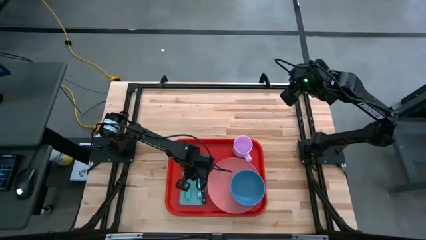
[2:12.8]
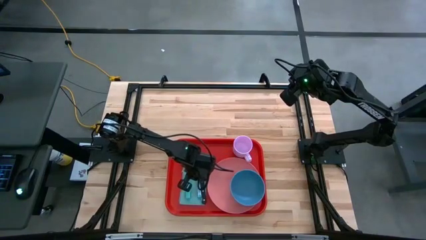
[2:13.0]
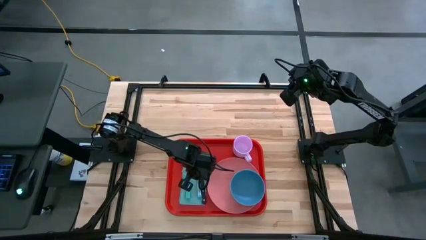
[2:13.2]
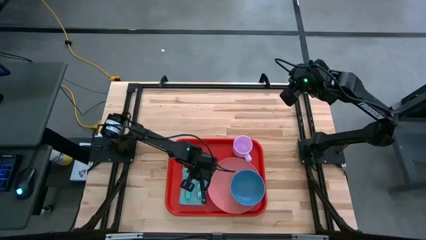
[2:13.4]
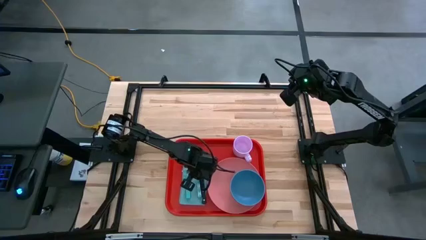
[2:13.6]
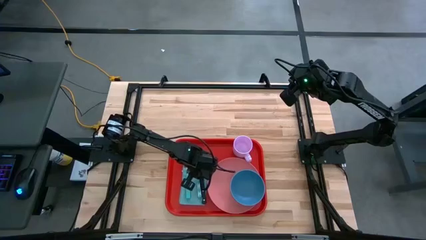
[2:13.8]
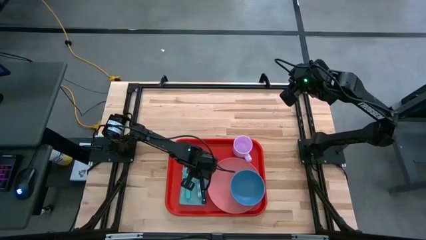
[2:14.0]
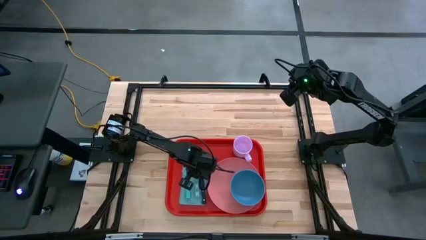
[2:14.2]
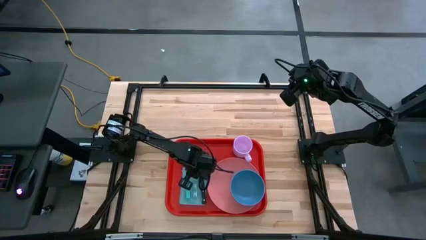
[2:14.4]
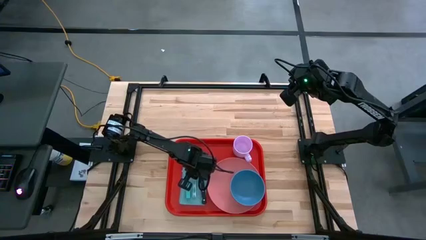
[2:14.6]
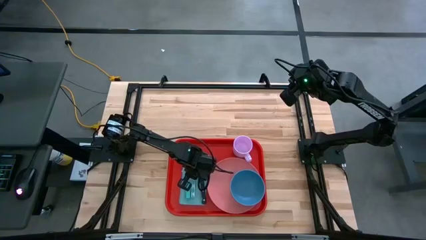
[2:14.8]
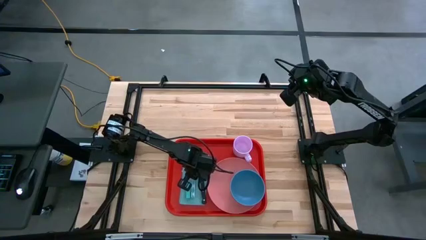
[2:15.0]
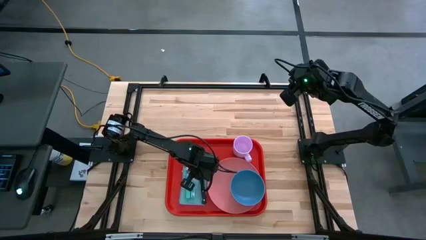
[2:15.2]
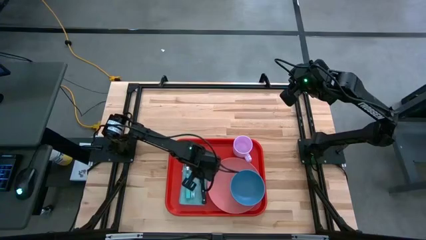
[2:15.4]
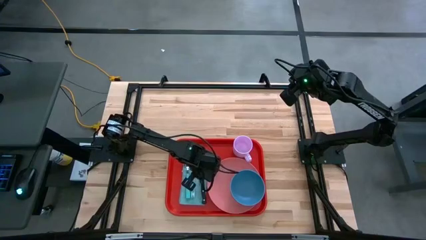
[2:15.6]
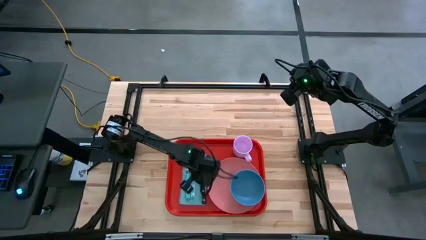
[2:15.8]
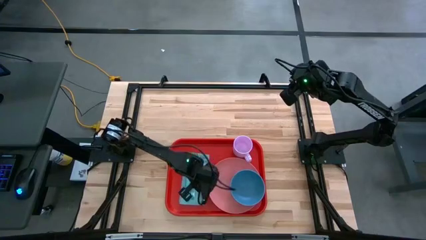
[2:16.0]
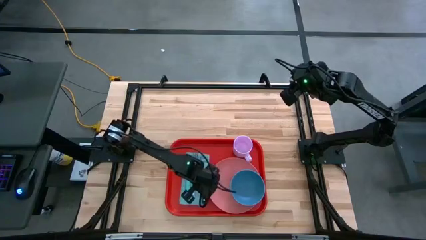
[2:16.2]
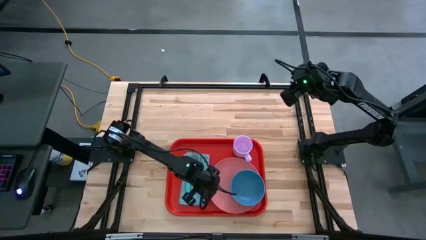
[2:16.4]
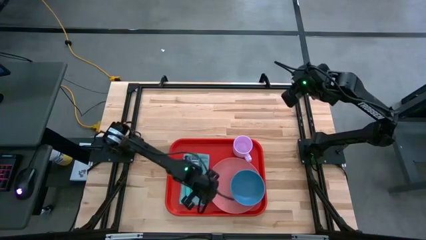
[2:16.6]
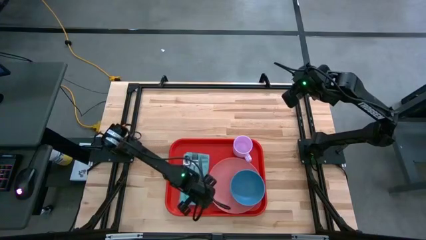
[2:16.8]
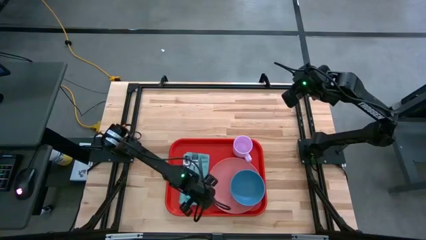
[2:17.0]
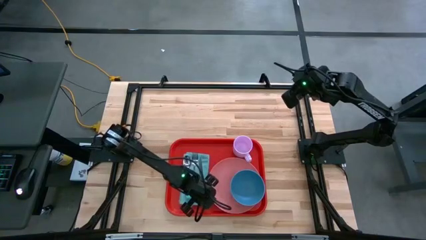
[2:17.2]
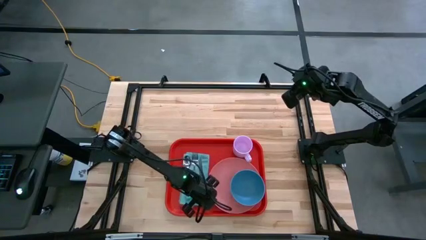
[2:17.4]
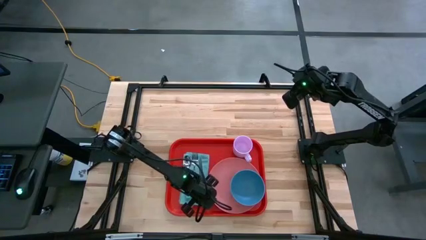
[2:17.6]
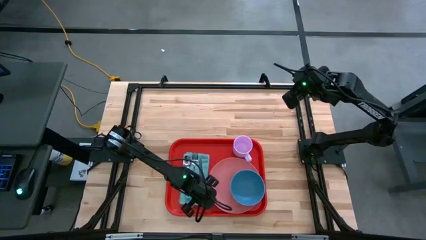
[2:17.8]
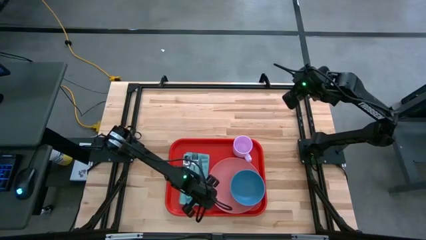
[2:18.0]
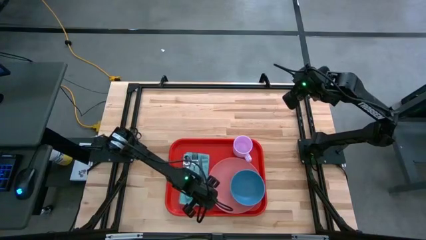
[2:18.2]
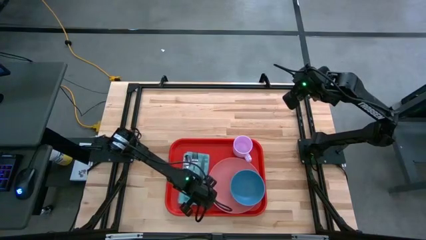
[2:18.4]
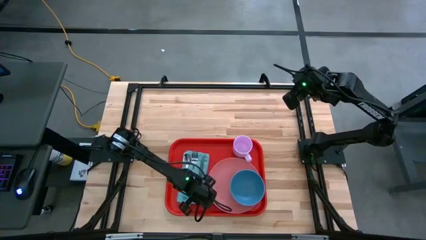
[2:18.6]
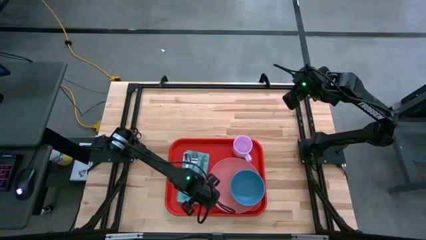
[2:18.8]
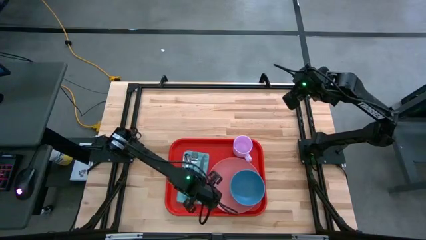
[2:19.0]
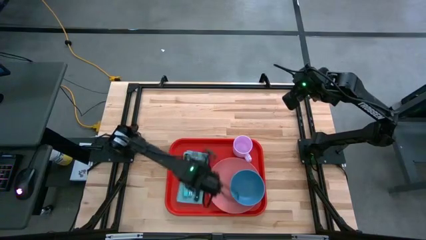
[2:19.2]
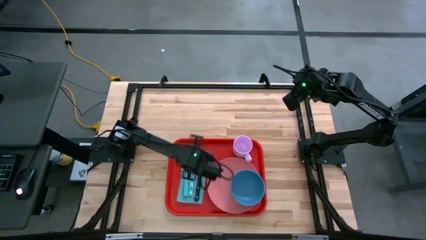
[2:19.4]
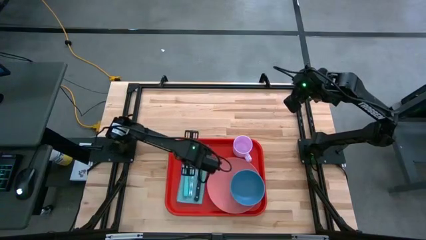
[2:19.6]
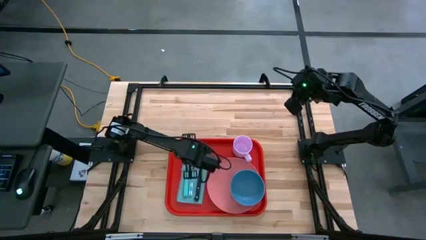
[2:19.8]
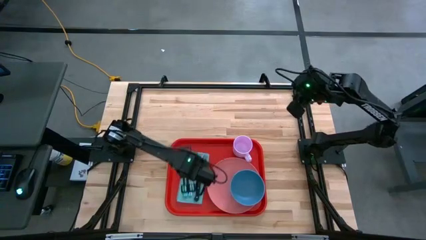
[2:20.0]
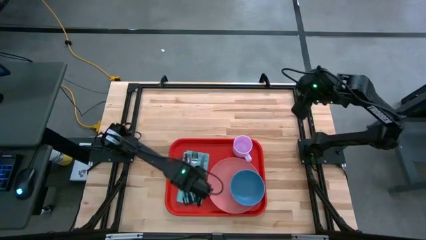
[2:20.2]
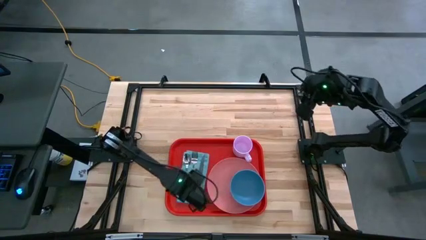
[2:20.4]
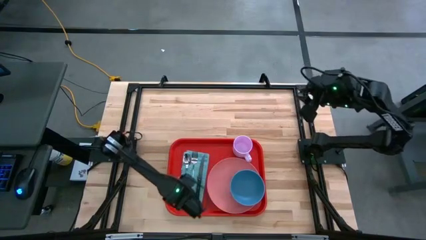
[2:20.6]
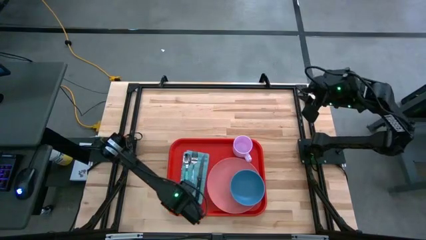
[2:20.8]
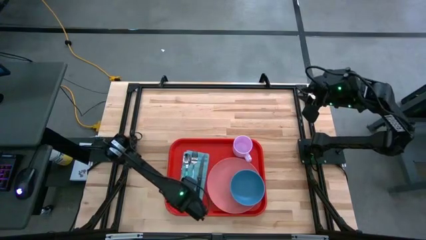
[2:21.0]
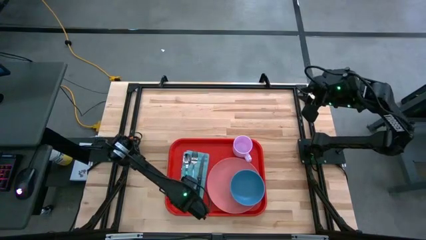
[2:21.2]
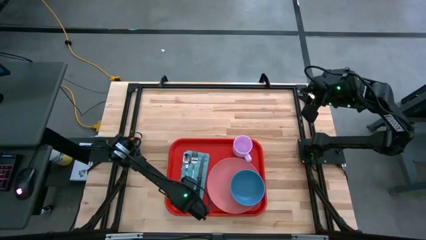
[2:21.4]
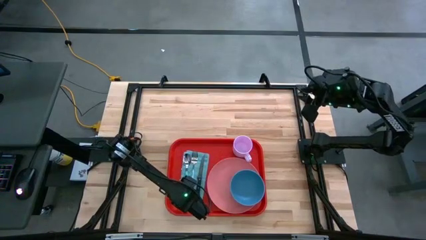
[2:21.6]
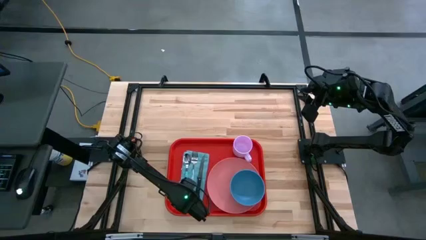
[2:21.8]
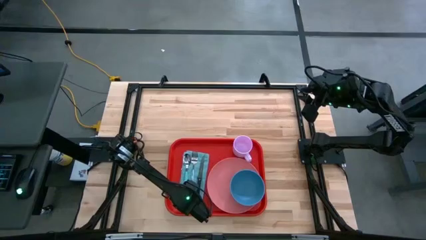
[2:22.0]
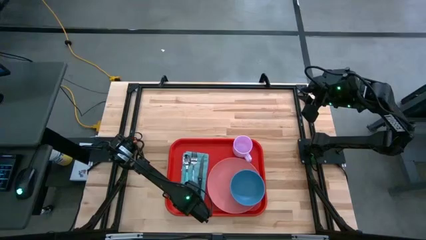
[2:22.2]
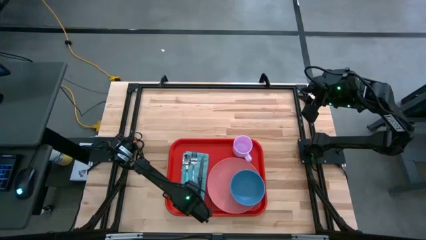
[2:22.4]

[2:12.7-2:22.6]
Task: Set up tray
Adjust the blue fork, black knife, and blue napkin on the red serving tray

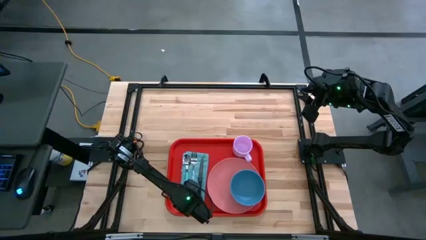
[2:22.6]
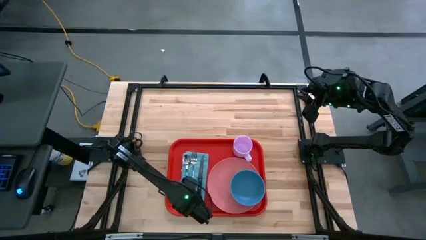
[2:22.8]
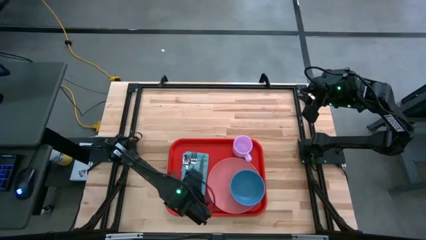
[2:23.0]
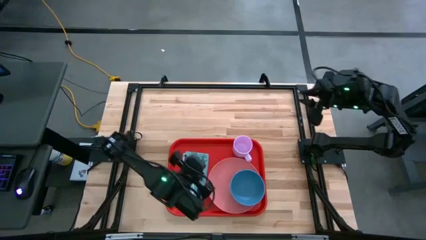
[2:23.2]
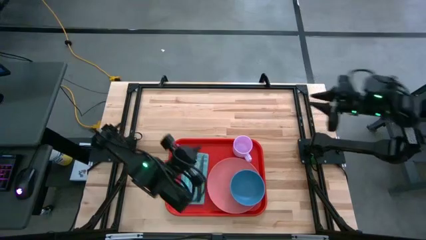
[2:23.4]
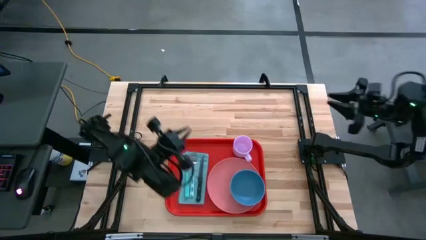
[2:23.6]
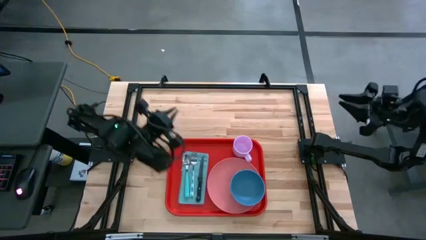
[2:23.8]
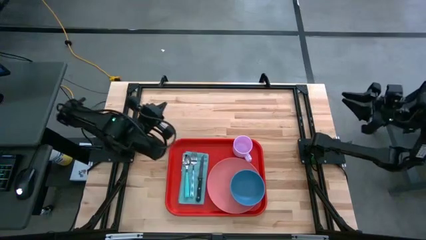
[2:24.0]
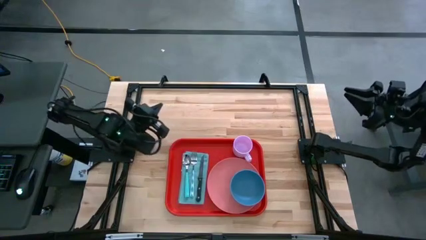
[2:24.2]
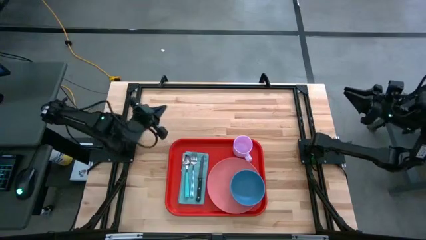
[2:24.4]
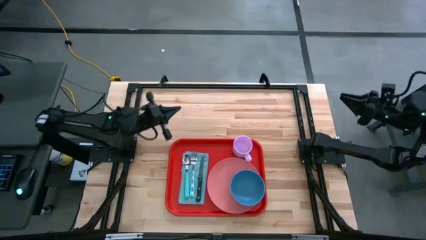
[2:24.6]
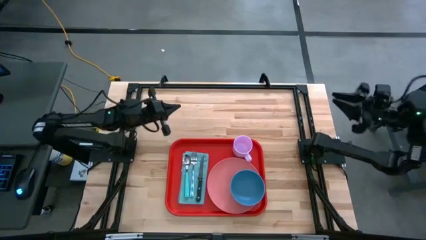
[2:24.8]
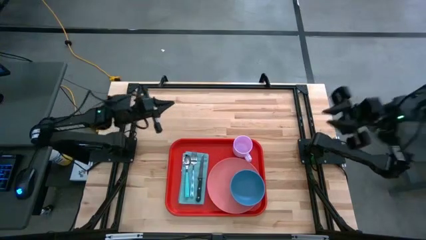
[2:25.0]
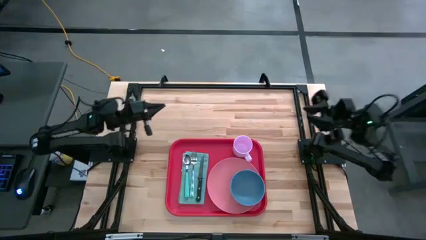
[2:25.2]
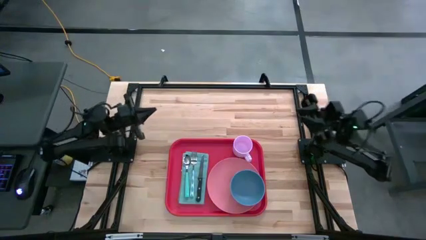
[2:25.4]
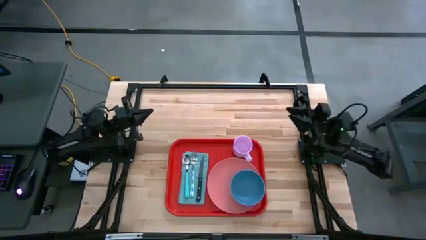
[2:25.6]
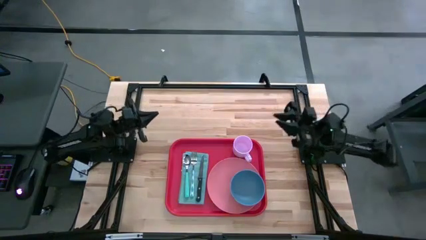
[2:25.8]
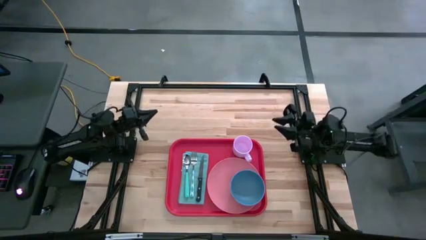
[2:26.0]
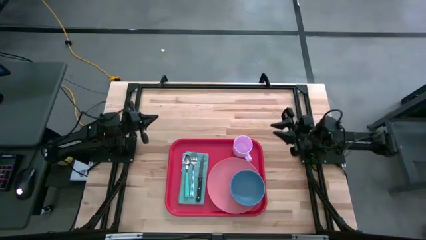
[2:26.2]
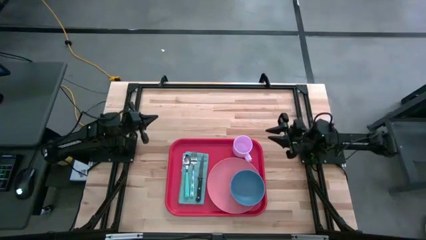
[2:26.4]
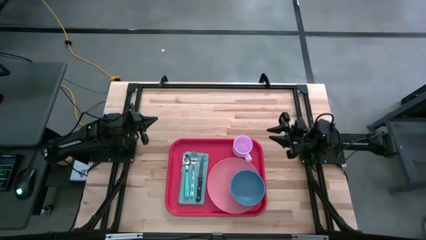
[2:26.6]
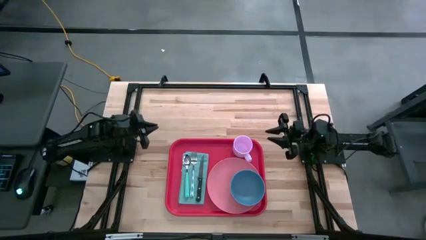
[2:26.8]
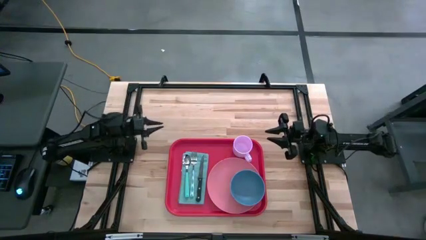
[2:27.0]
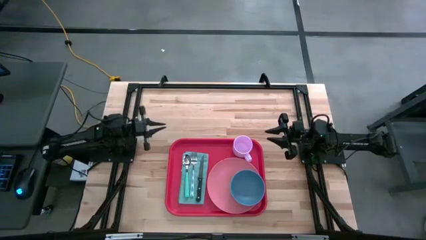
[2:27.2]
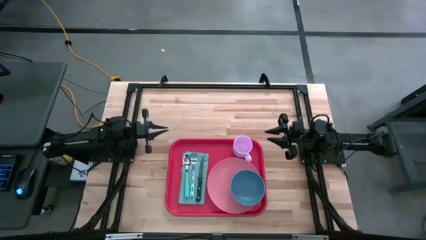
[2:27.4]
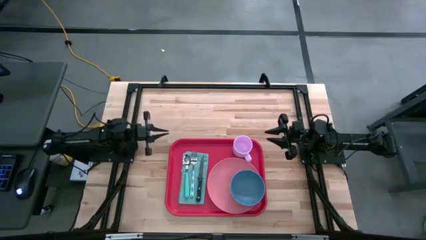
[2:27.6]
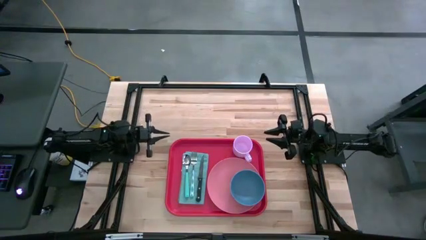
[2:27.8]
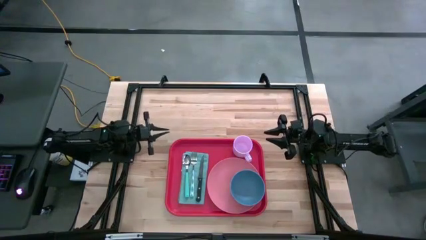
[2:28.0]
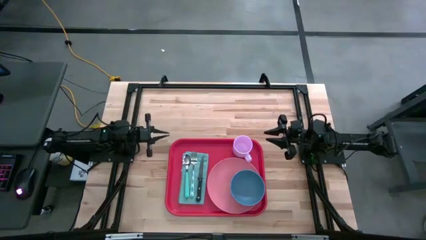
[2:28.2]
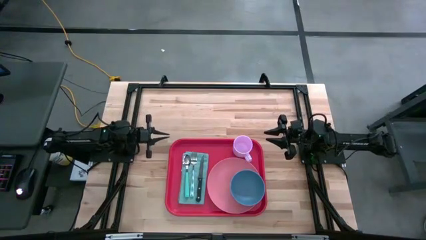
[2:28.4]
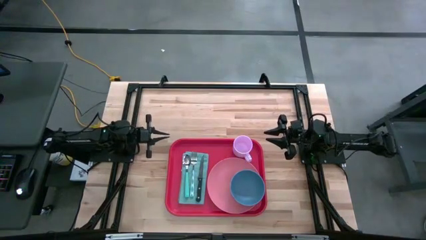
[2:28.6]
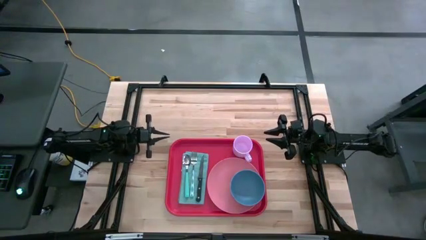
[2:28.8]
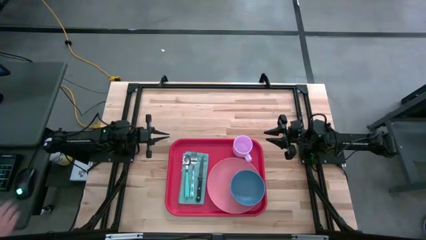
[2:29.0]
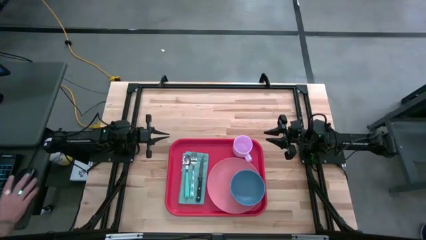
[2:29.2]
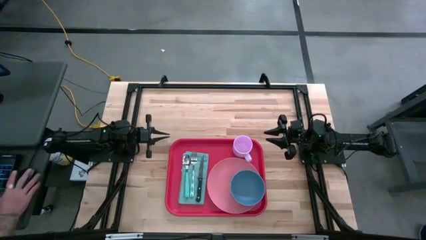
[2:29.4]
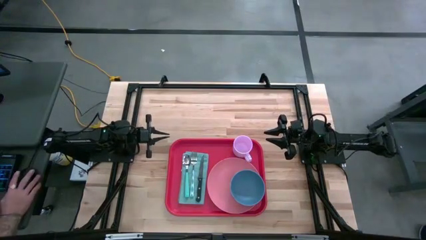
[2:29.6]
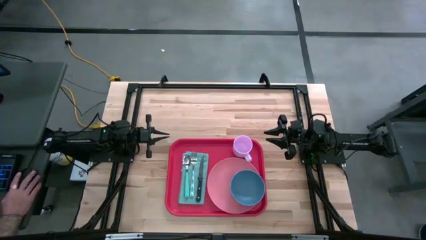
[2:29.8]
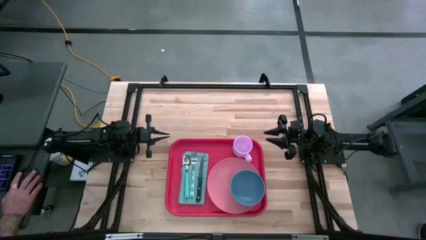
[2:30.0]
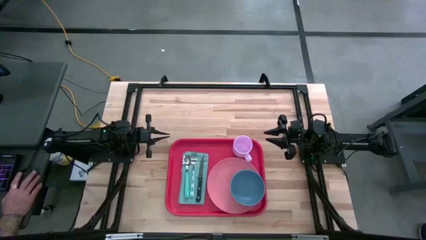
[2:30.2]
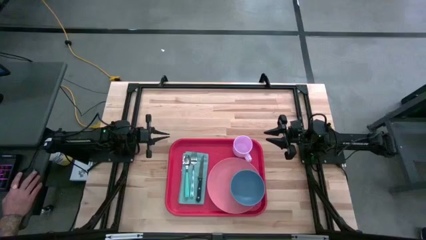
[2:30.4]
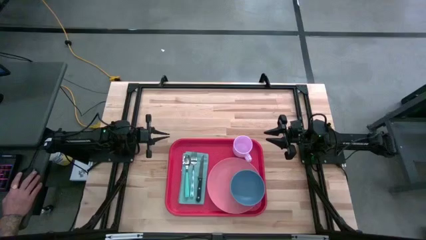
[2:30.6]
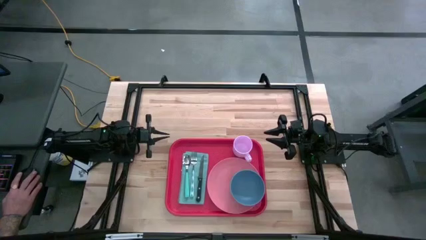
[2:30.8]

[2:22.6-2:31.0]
Return to Home Position
